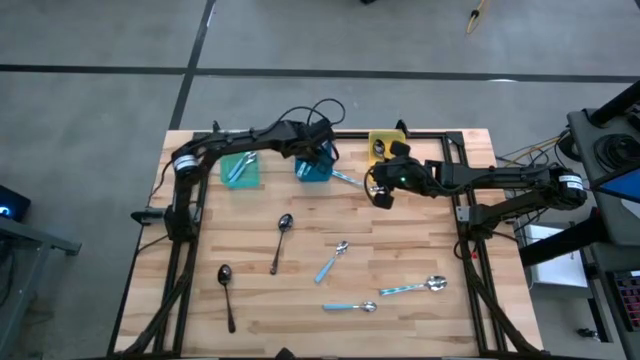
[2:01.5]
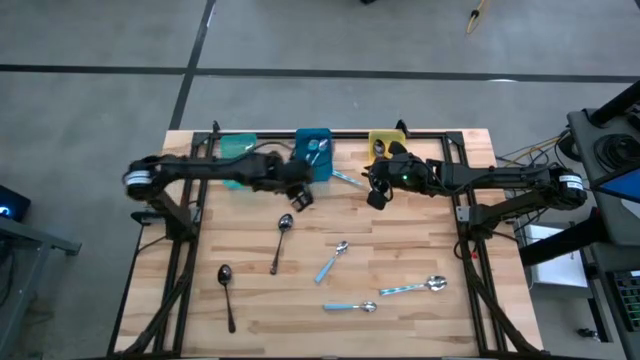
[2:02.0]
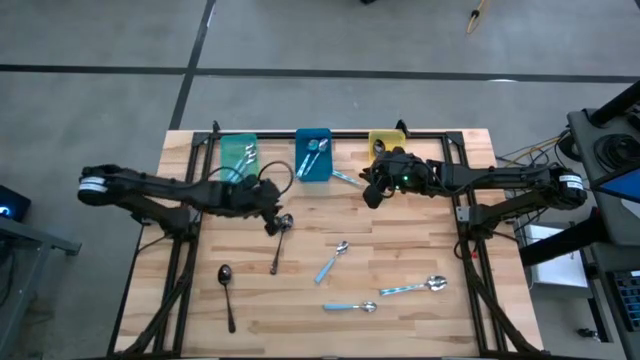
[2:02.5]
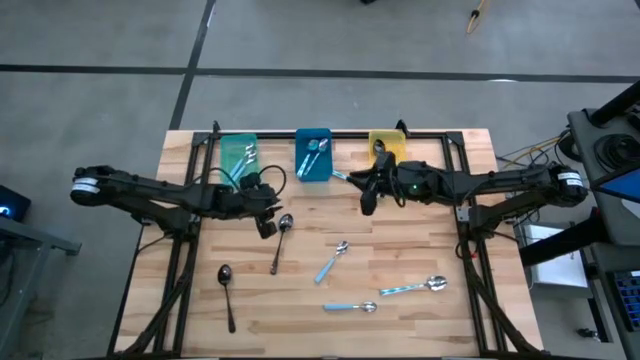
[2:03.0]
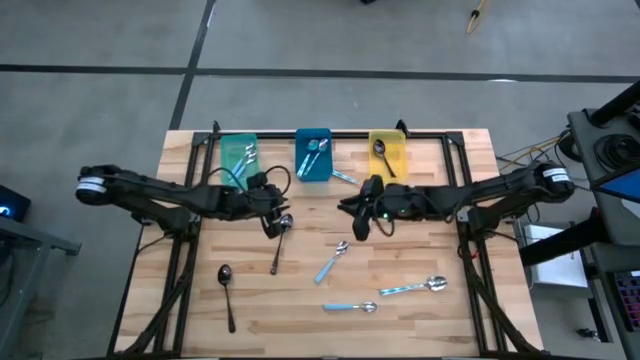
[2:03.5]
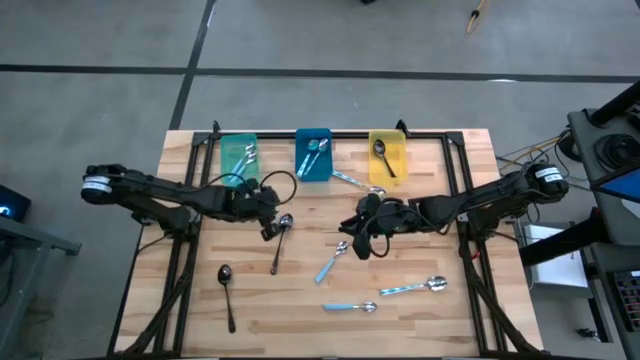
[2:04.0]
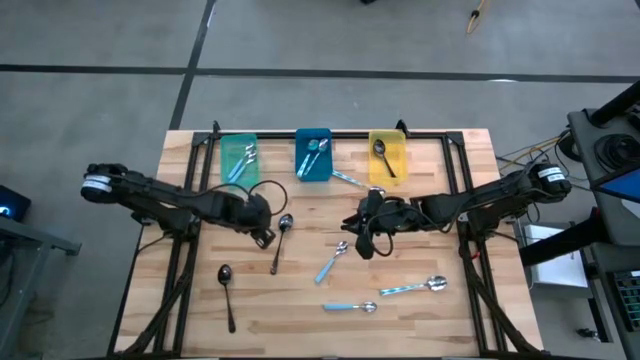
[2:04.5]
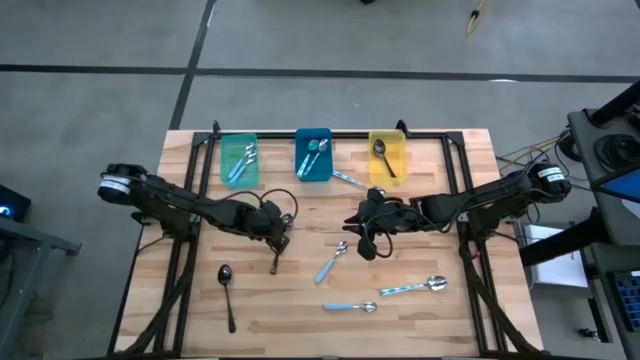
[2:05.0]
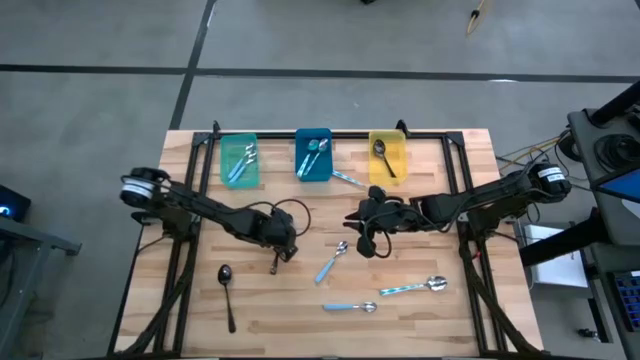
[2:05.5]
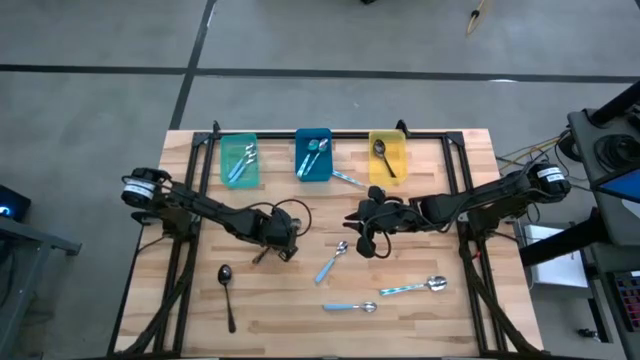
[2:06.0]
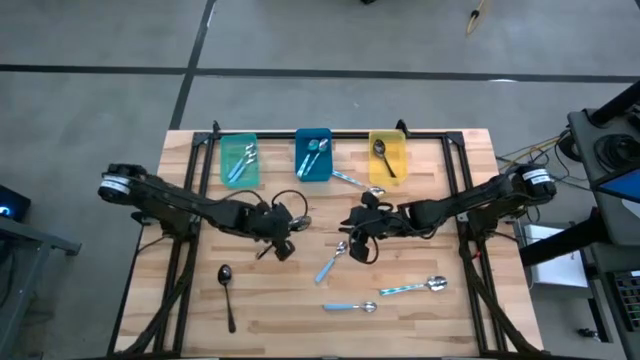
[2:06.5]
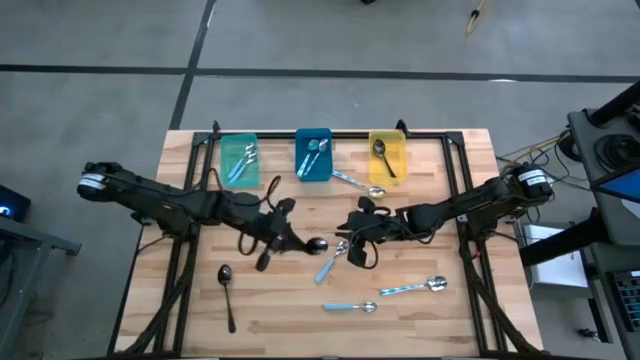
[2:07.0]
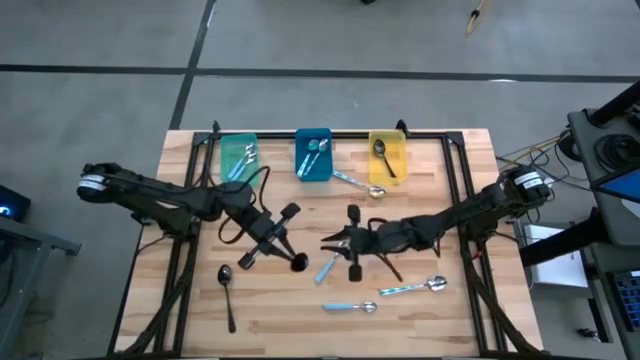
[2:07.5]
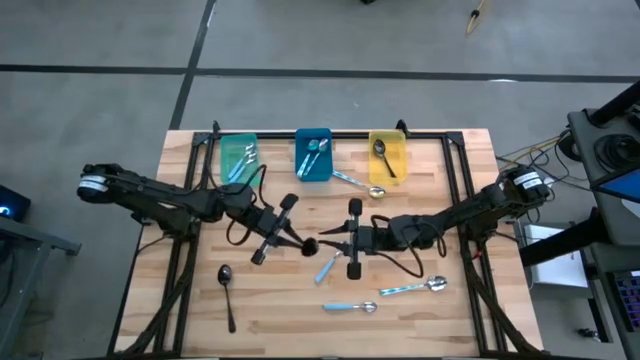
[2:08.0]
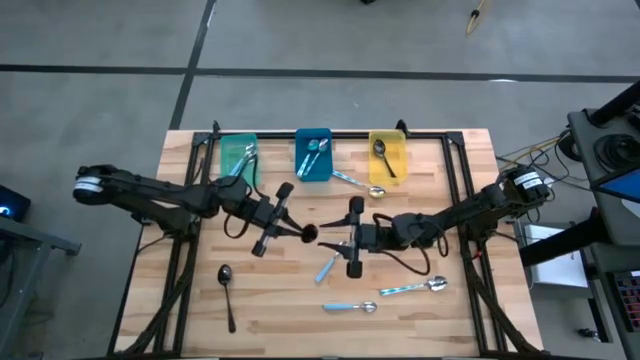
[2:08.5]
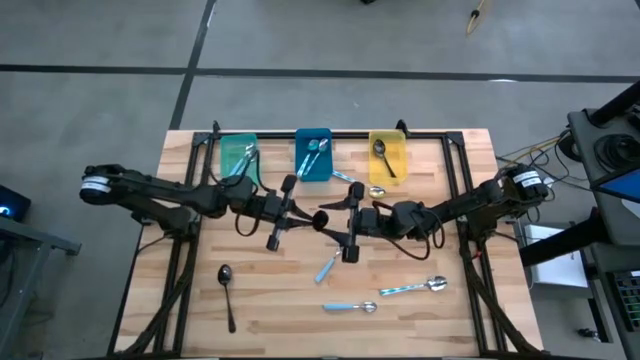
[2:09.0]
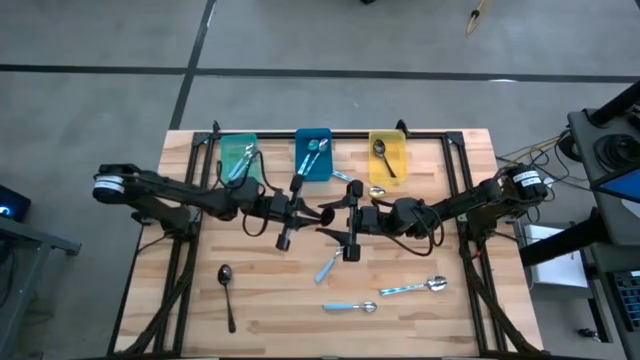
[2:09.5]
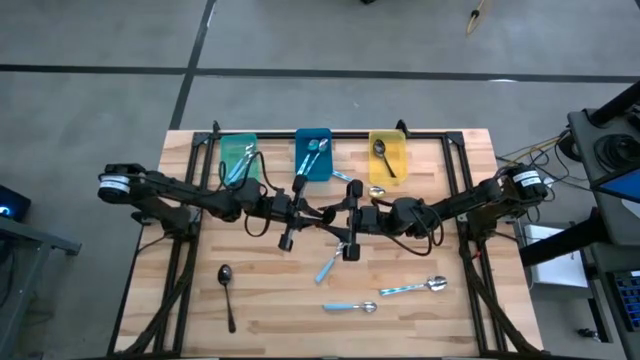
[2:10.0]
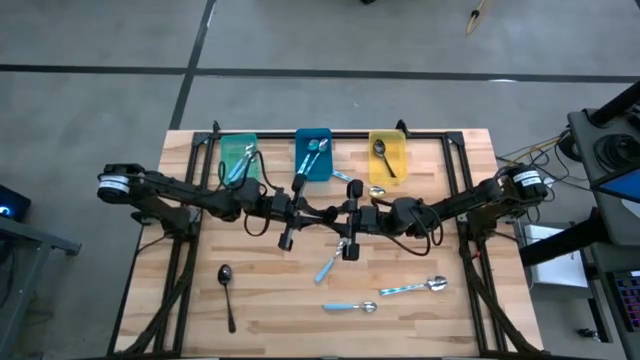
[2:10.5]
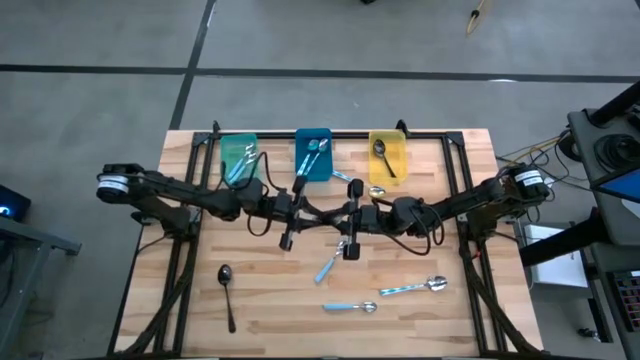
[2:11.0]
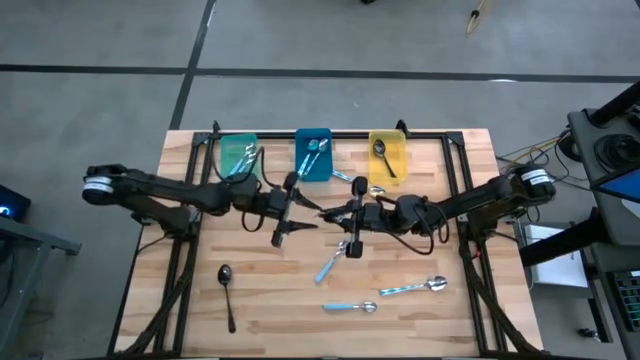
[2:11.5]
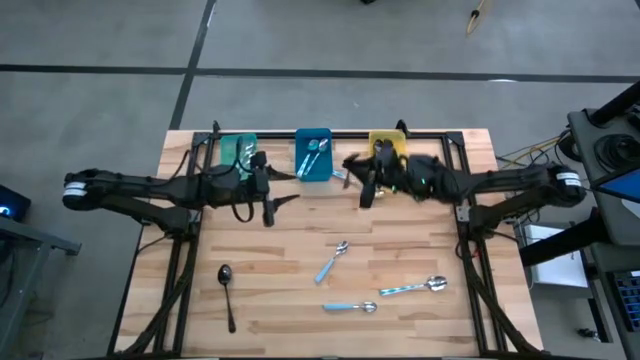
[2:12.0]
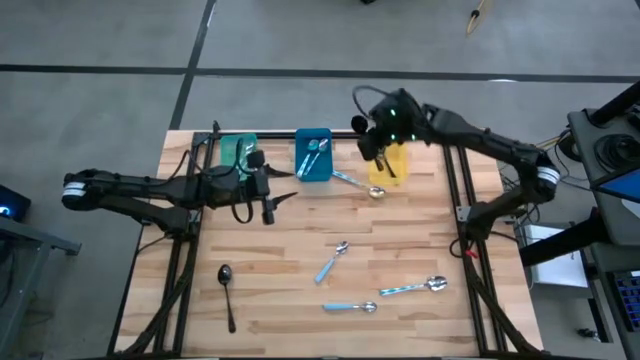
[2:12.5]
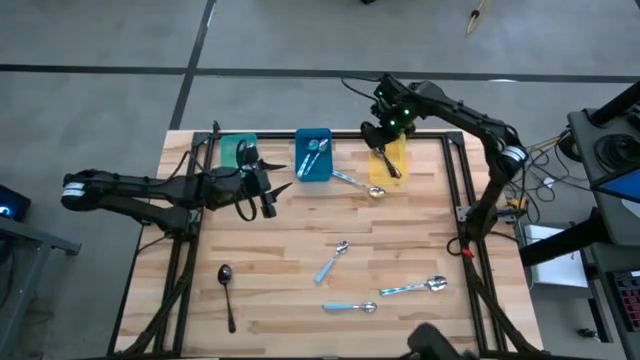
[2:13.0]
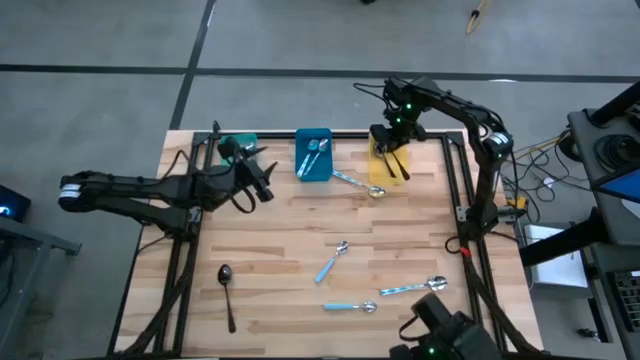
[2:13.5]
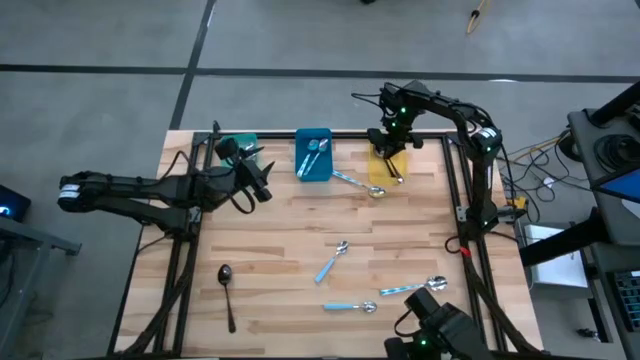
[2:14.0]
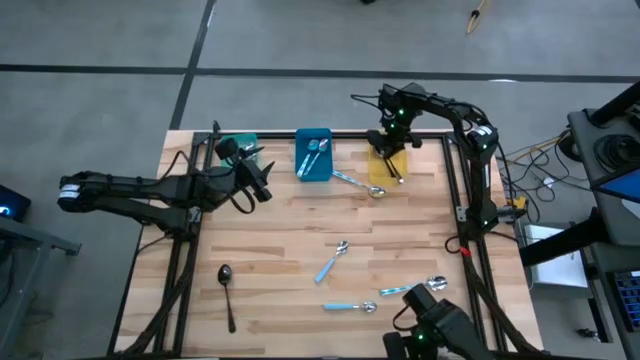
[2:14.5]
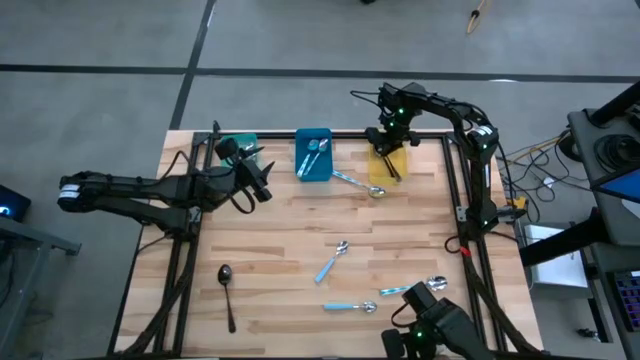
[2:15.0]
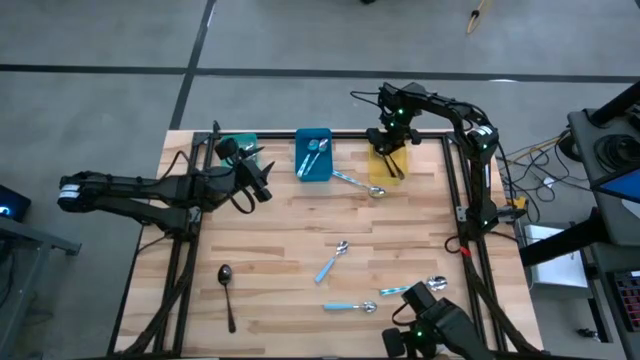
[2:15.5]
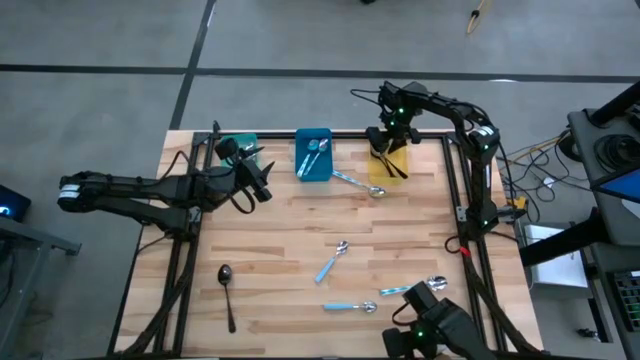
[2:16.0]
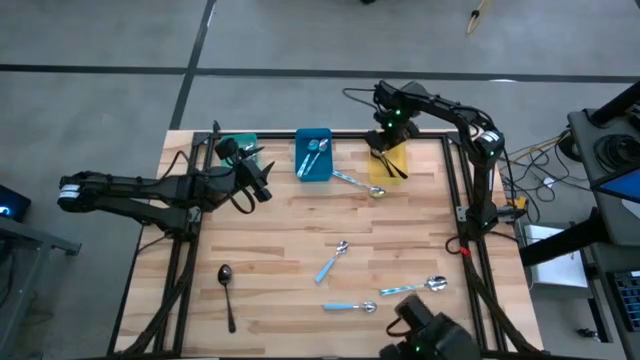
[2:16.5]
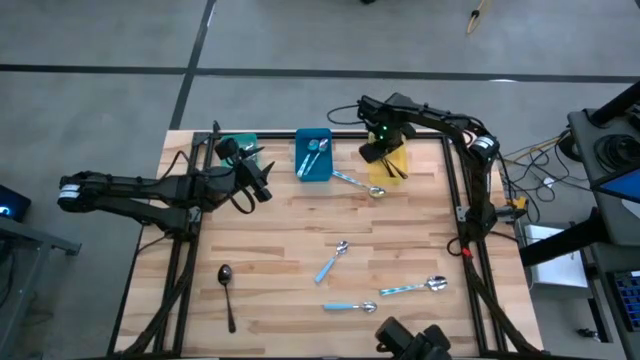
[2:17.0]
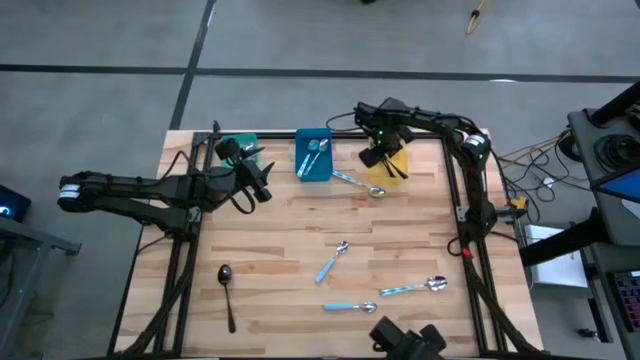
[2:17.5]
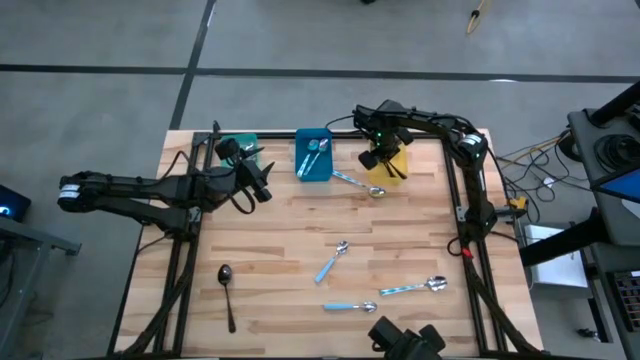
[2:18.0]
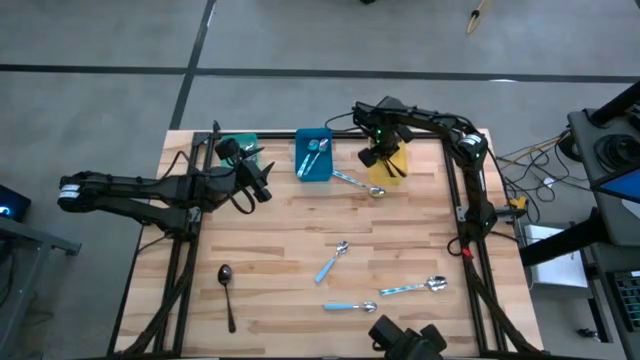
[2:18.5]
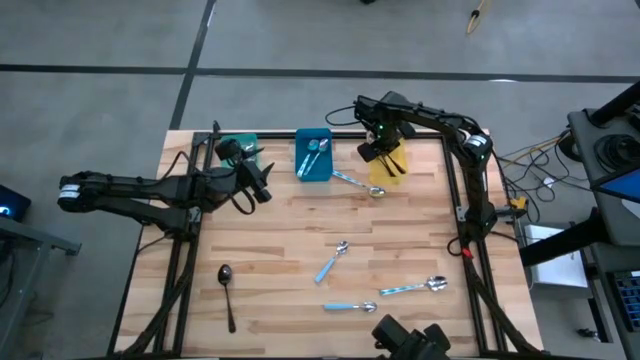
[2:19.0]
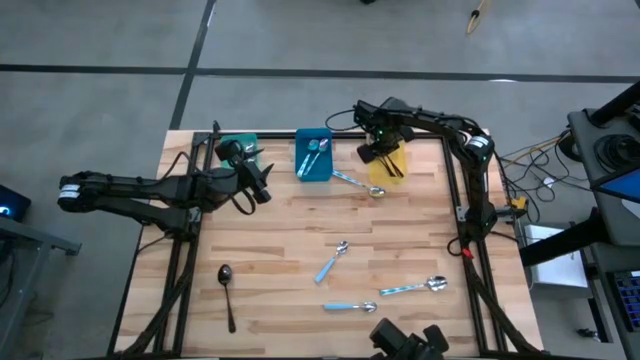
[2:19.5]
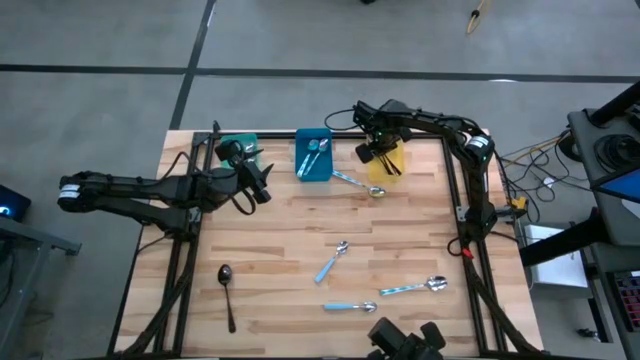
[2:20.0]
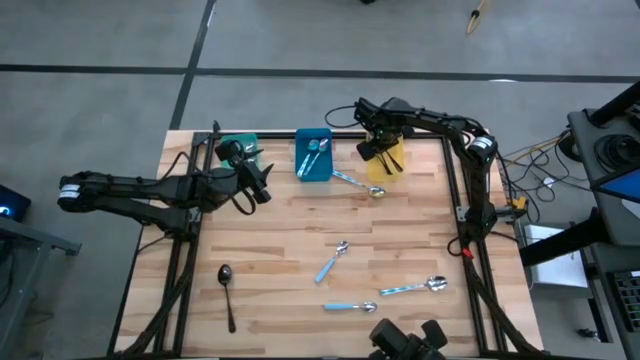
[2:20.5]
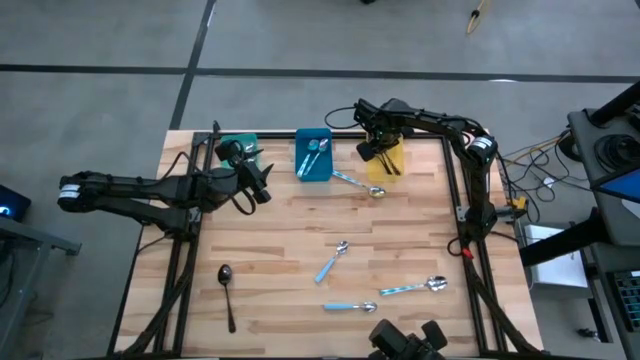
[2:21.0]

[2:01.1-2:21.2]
Task: Sort silverware by color (type)
Put the black spoon into the yellow bin
